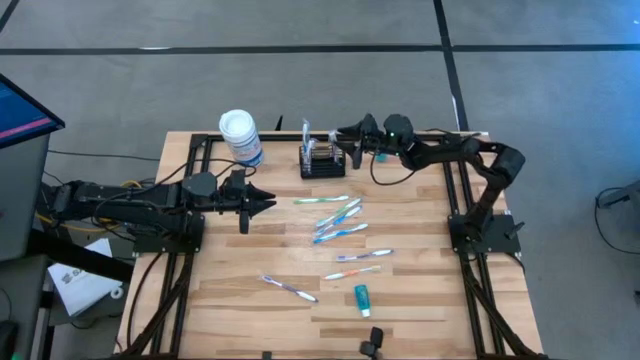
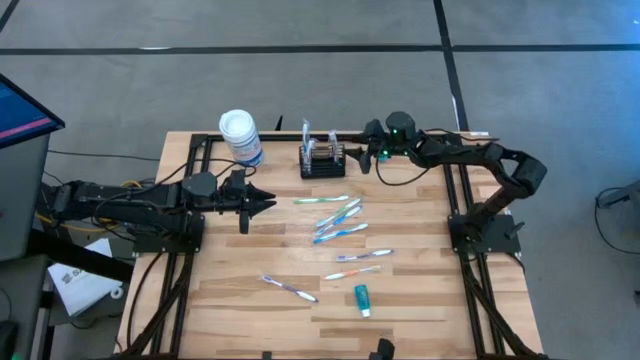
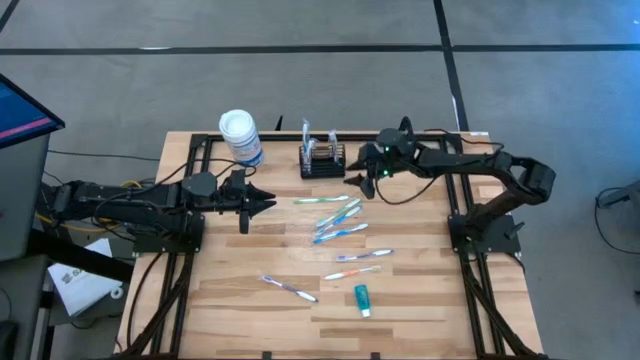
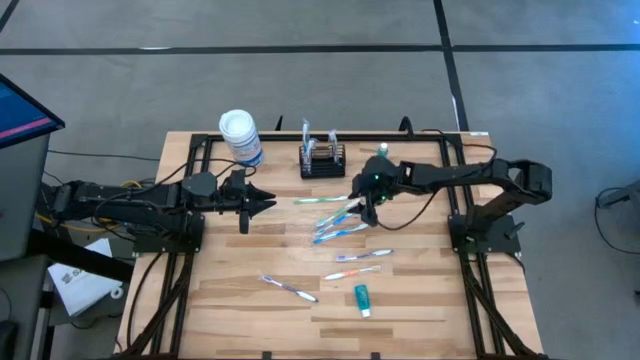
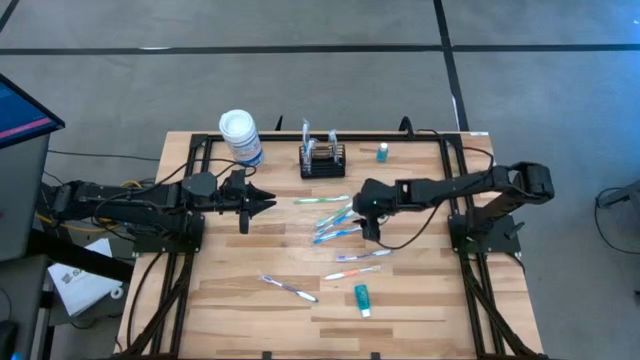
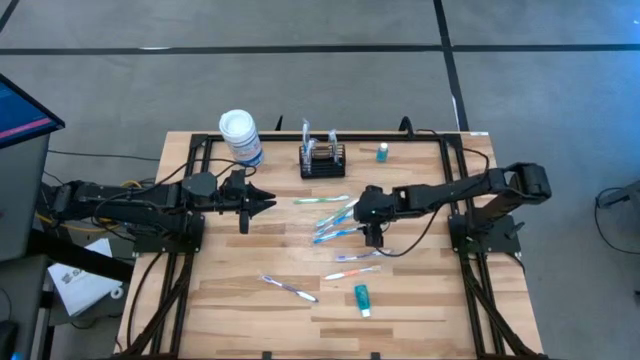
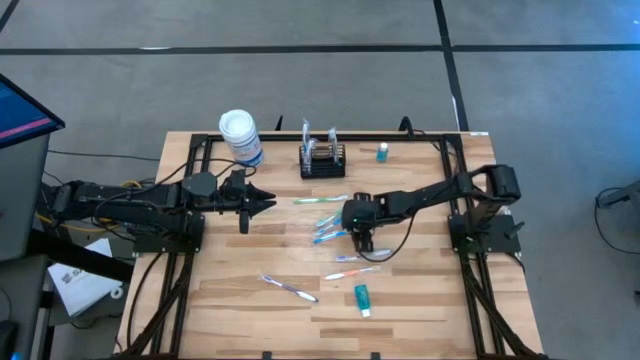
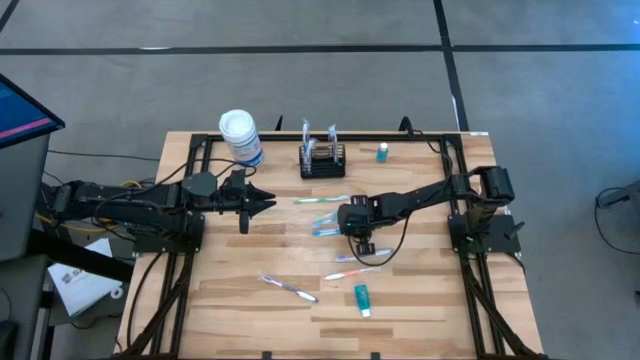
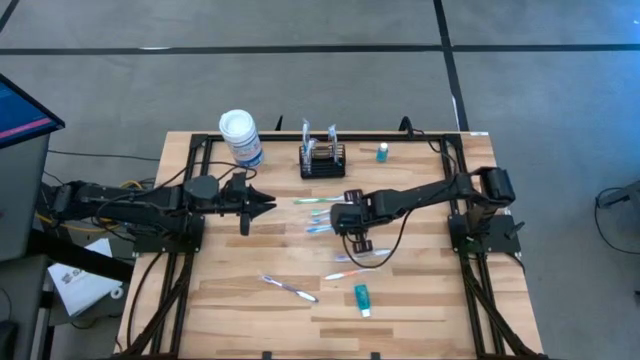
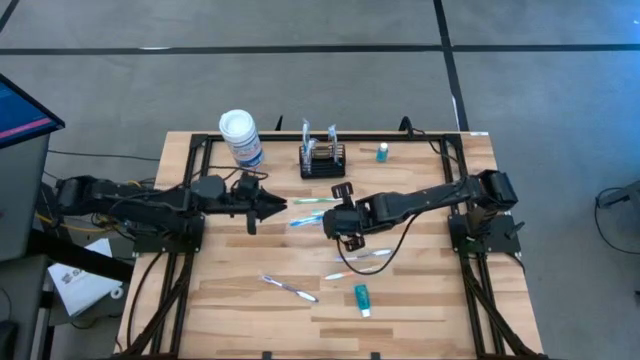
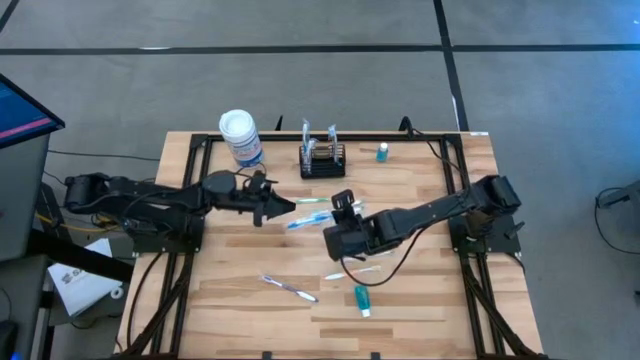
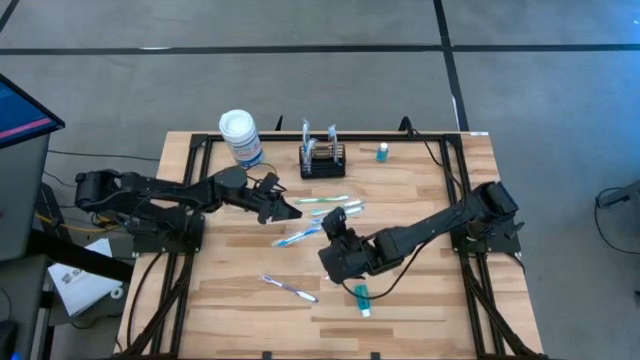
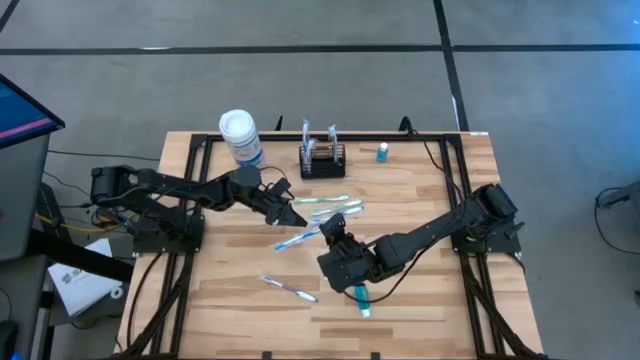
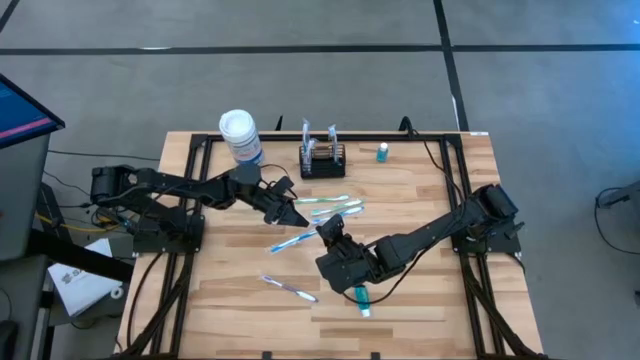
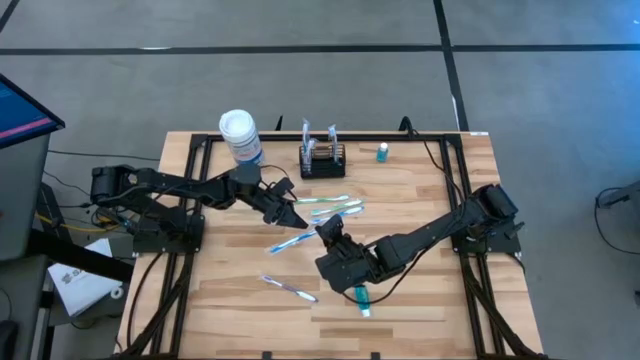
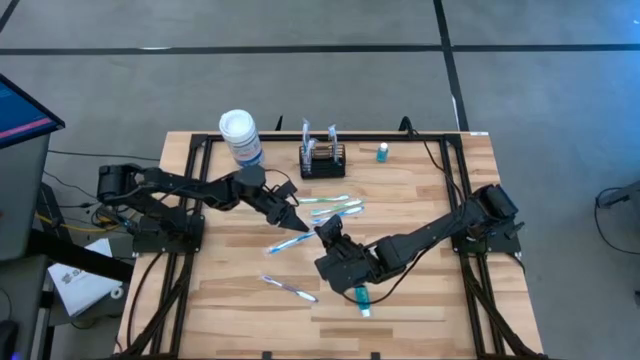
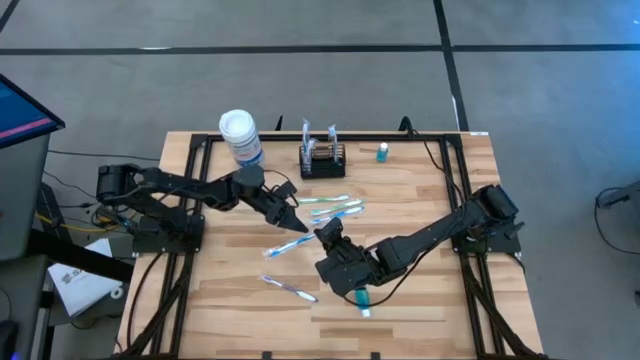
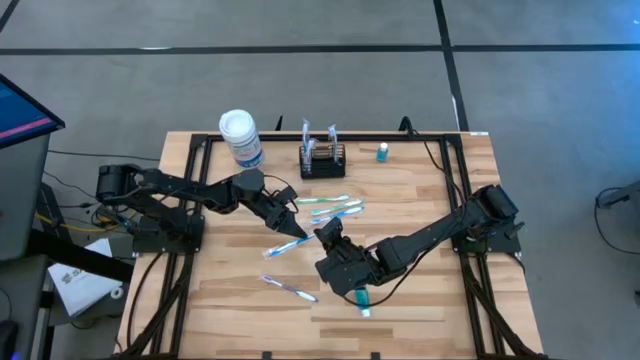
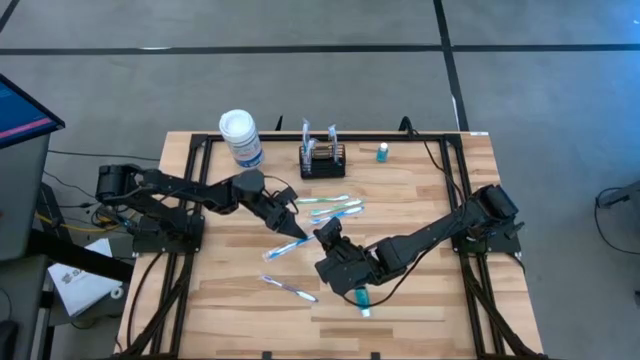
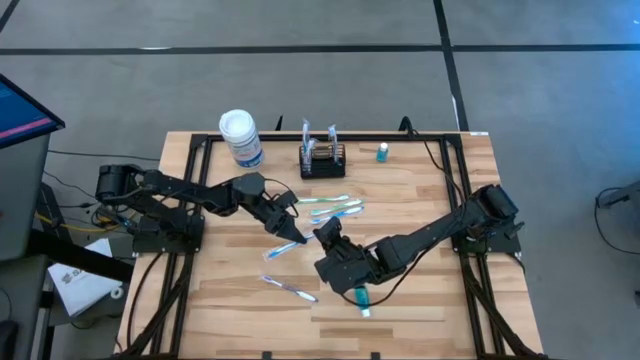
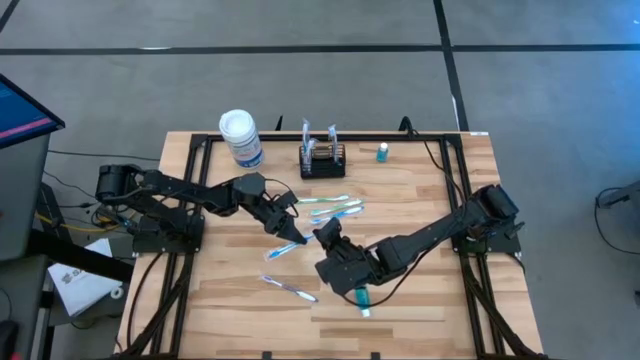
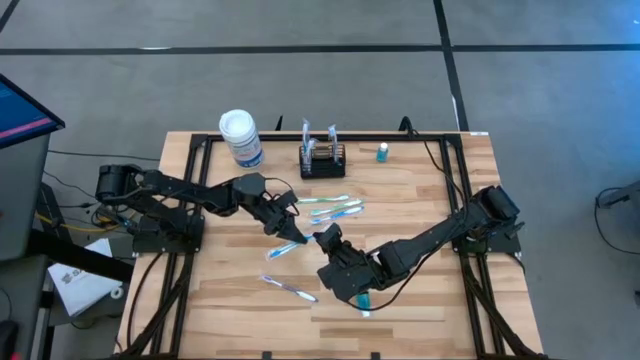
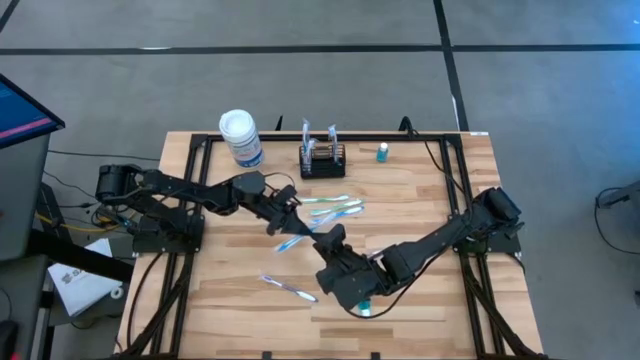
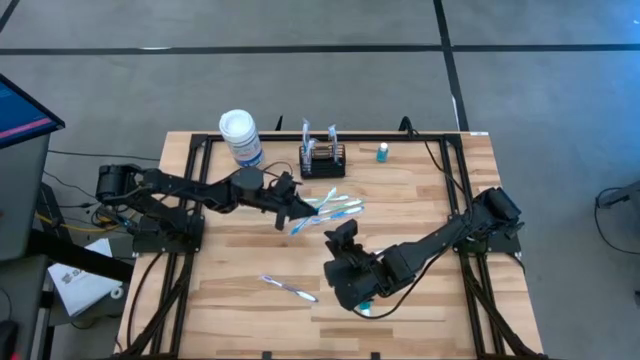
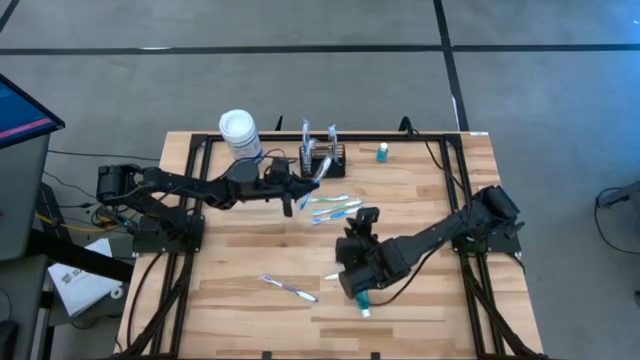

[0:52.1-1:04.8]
Task: Pick & Place toothbrushing station
Put the bottom blue toothbrush into the black wire organizer

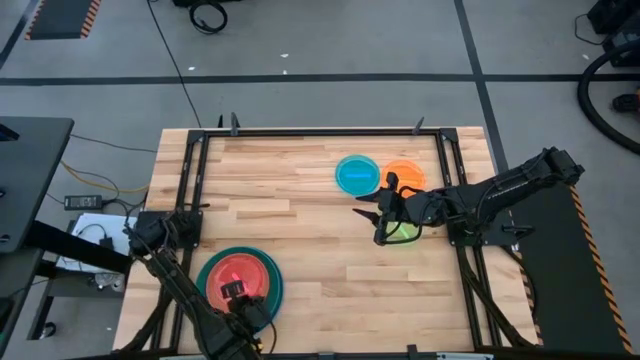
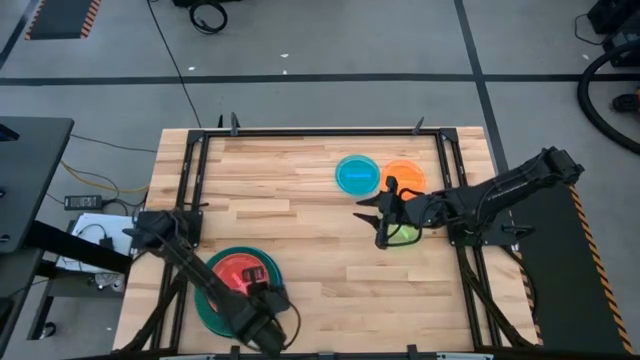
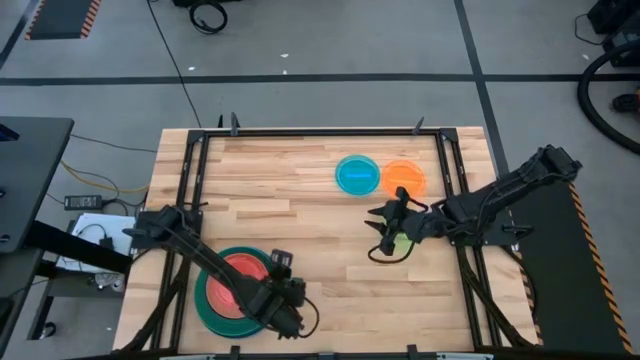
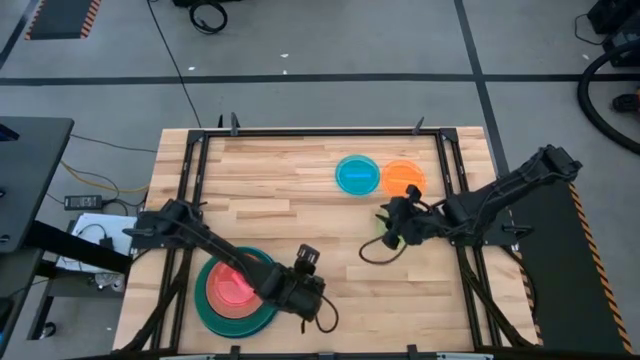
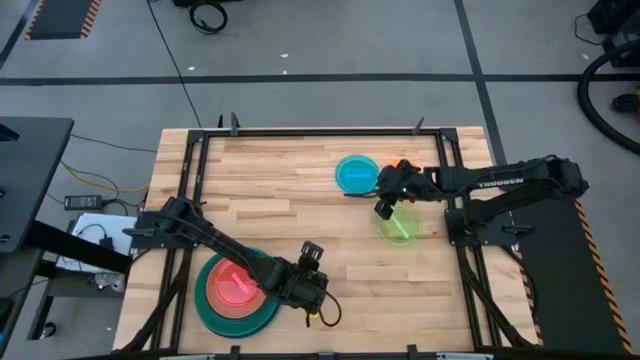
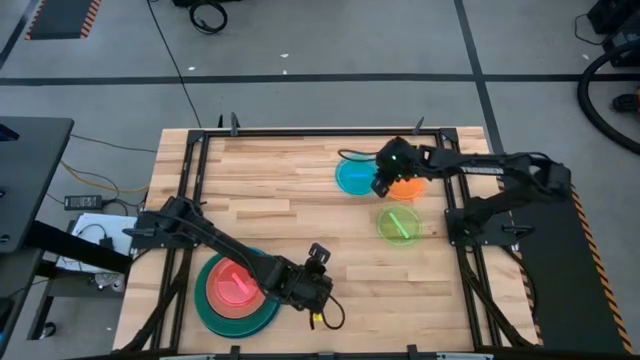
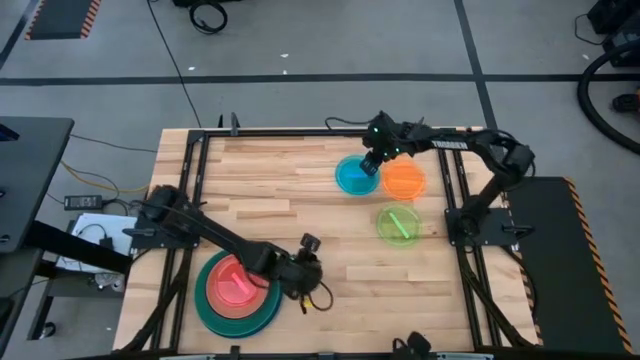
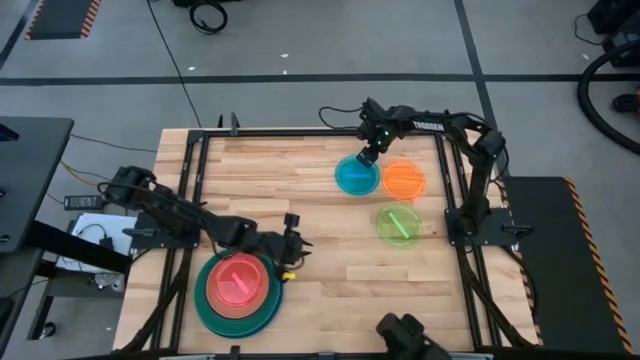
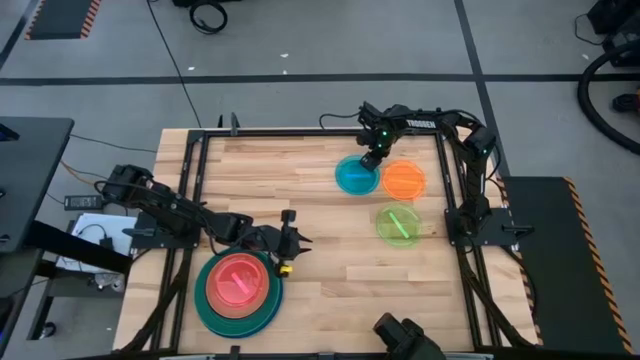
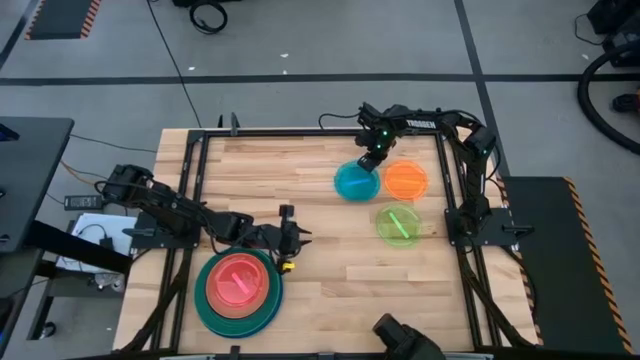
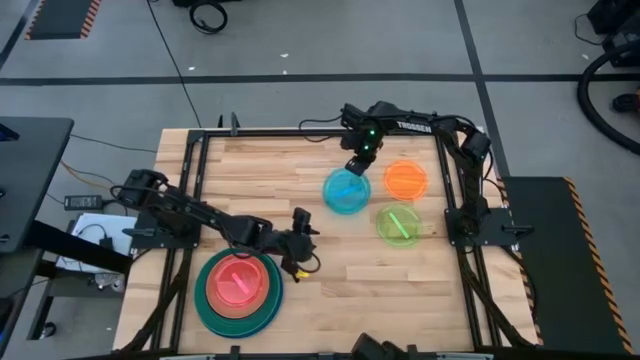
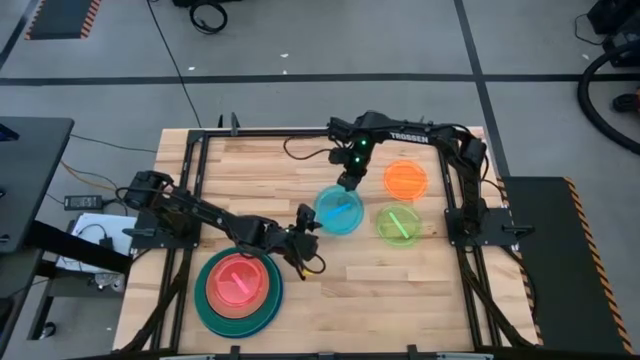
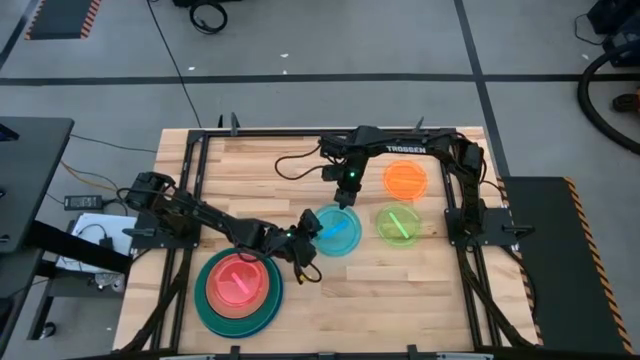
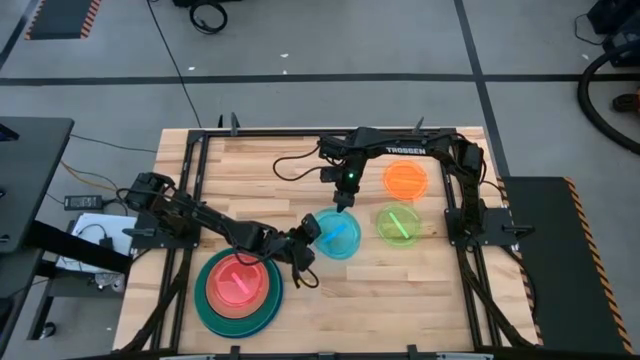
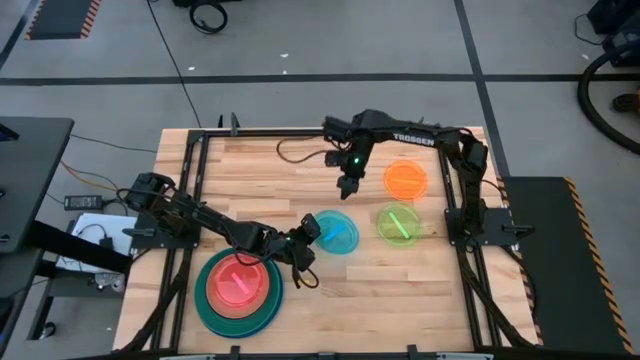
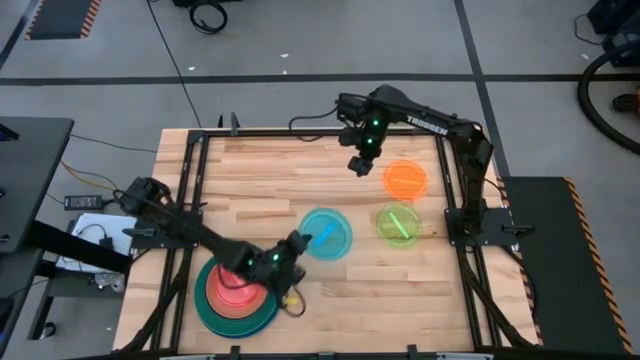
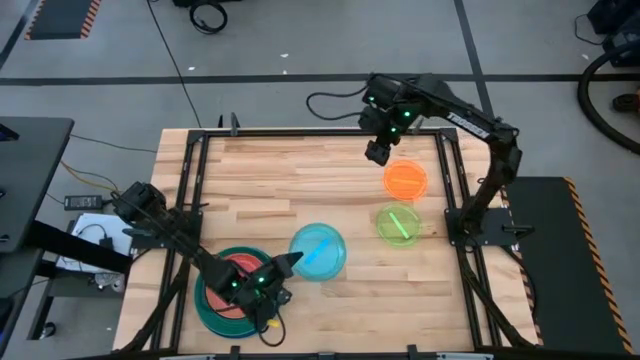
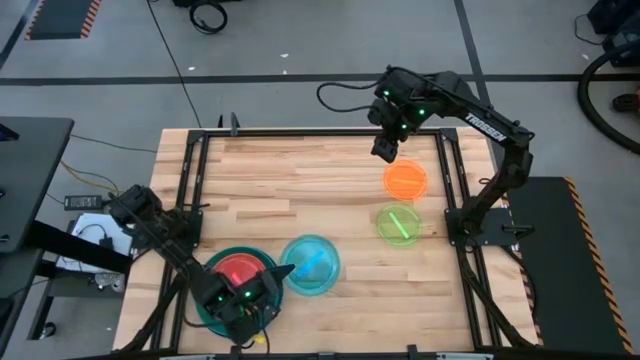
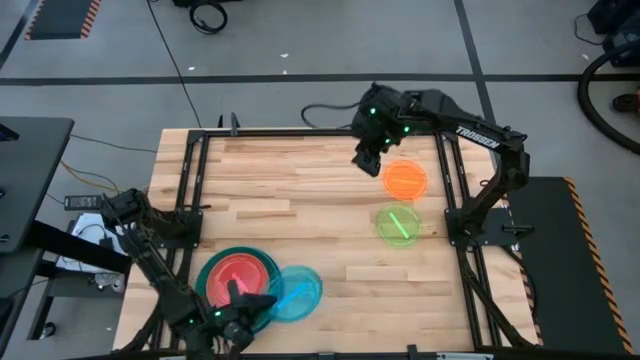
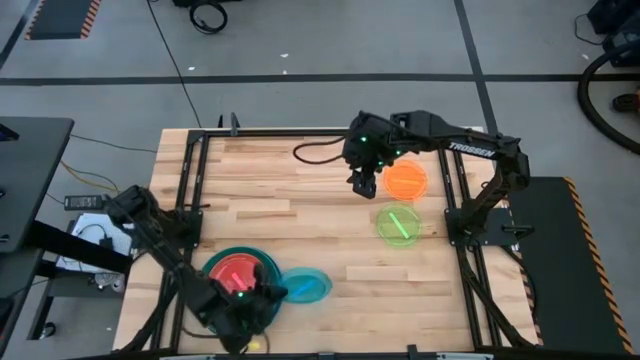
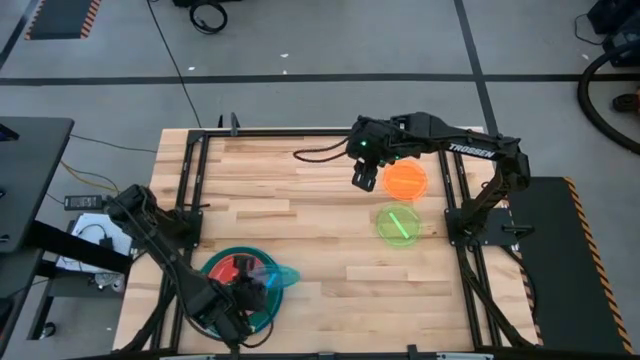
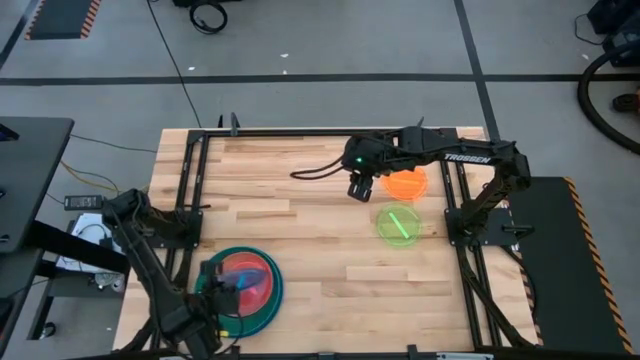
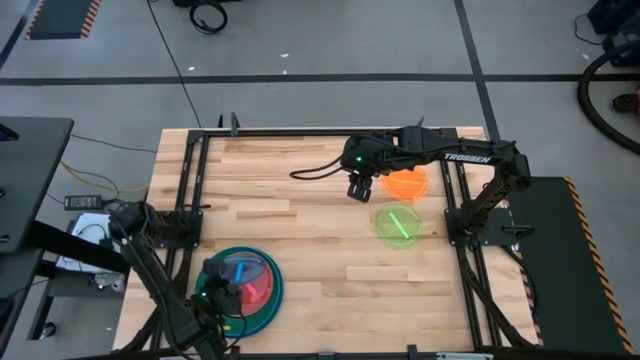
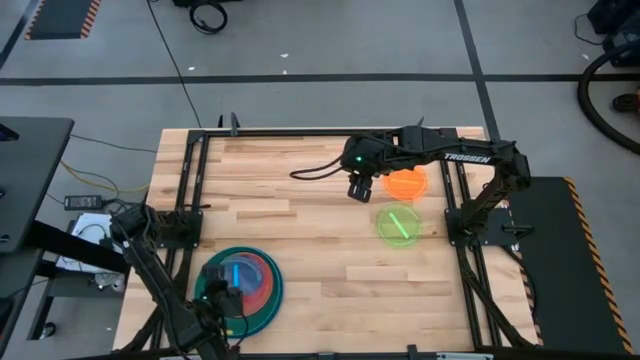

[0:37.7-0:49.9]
Task: Stack plastic plates
Stack the light blue plate on top of the pink plate
